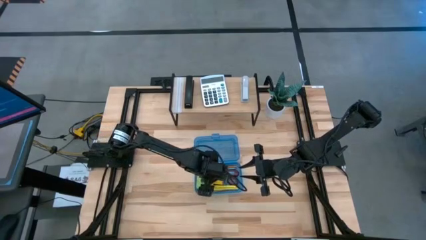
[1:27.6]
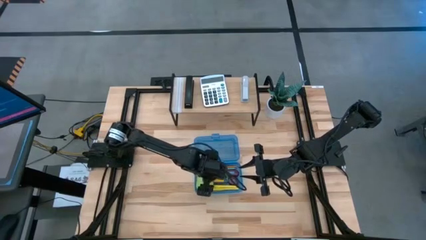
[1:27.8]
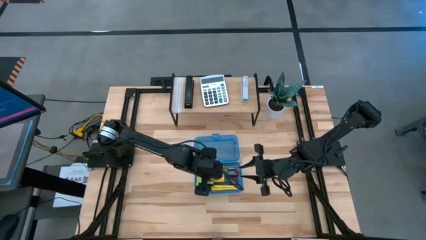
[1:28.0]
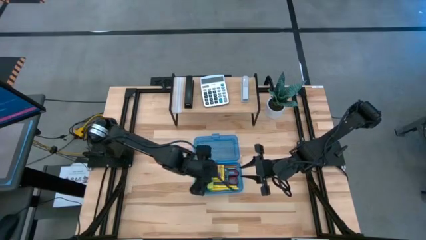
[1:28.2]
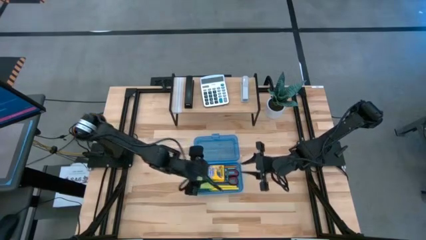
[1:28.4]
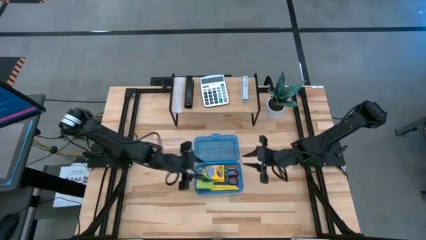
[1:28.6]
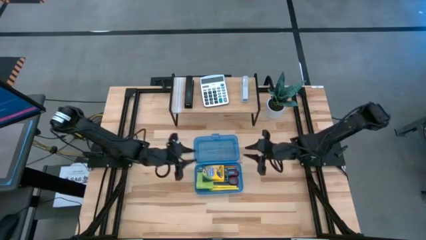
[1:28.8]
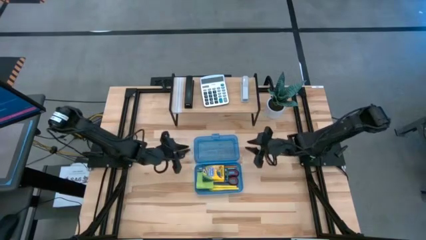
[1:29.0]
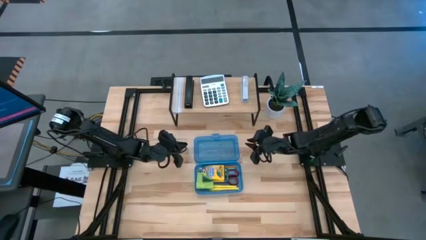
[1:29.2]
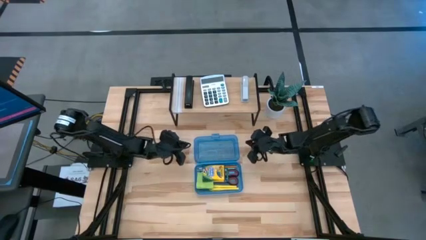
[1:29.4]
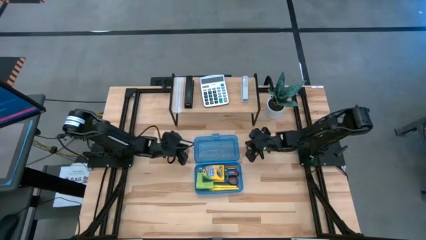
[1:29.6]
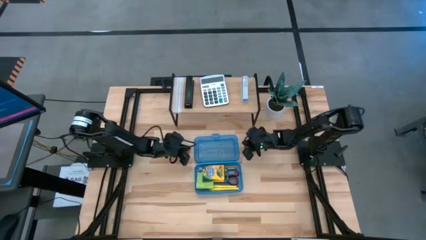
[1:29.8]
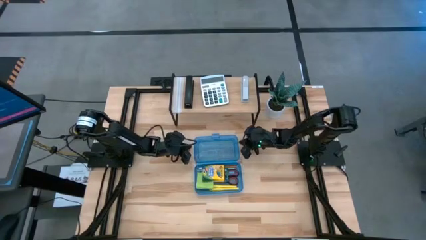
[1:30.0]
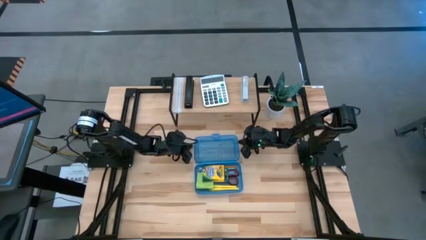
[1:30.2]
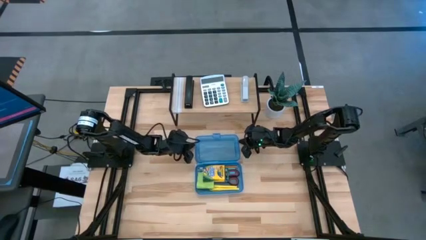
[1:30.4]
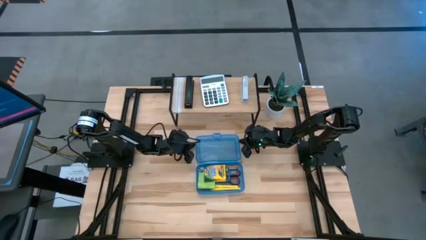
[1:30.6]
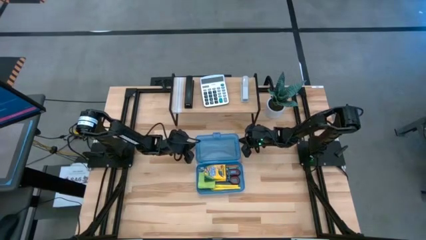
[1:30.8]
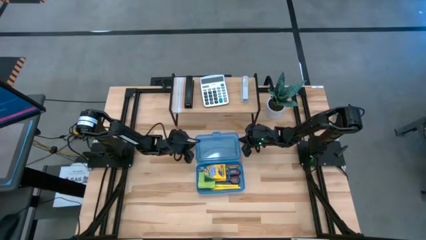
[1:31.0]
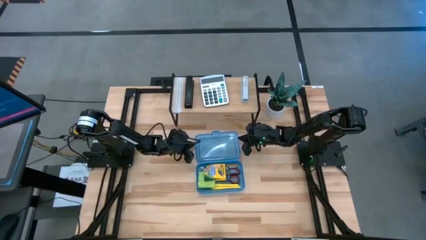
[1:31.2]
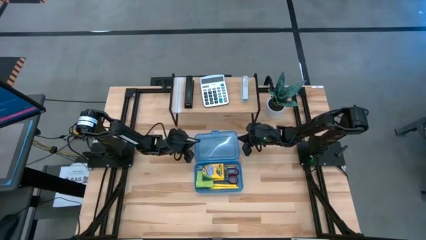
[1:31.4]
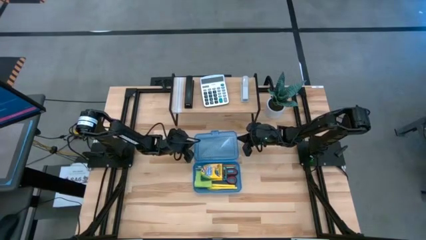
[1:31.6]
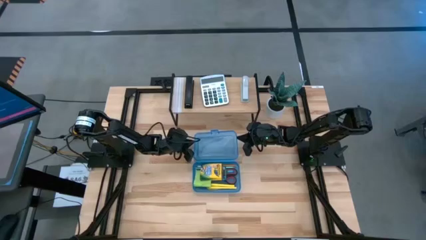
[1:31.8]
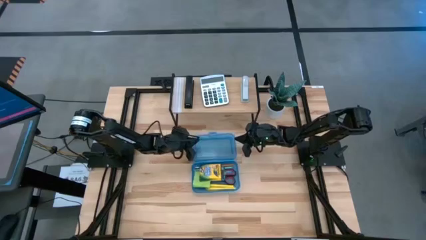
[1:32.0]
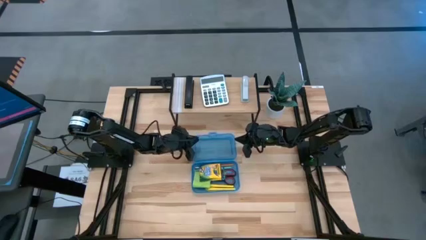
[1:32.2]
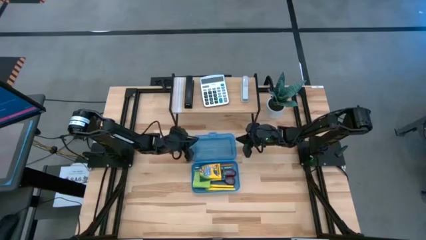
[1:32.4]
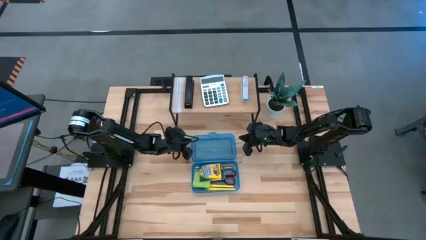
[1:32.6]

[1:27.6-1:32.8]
Task: Pack school essentials
Close the blue supply box

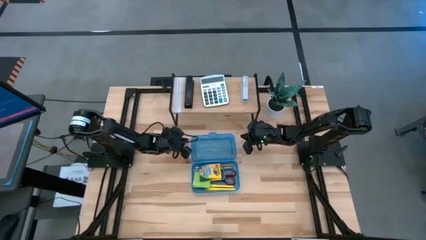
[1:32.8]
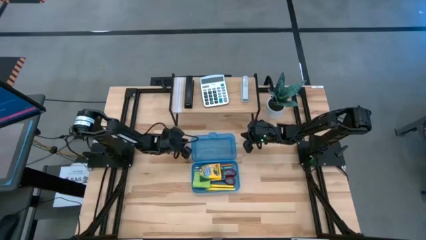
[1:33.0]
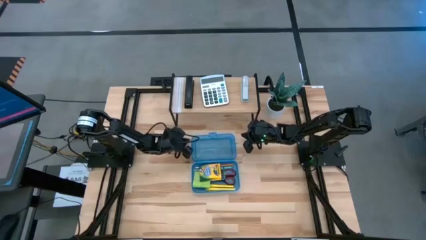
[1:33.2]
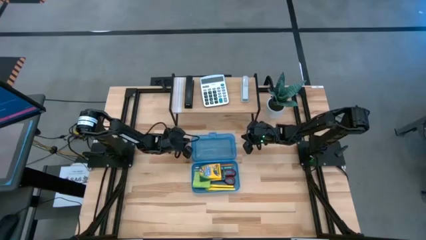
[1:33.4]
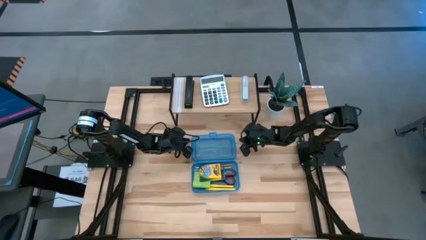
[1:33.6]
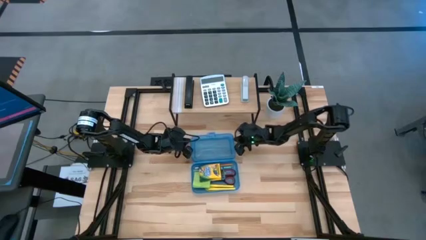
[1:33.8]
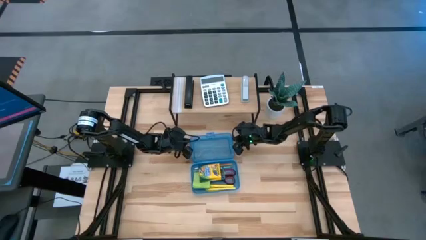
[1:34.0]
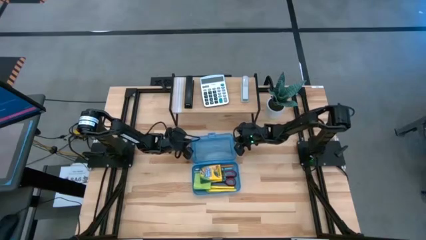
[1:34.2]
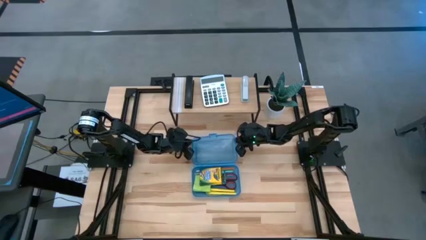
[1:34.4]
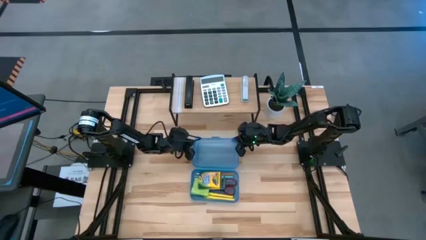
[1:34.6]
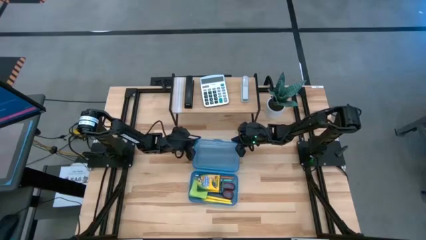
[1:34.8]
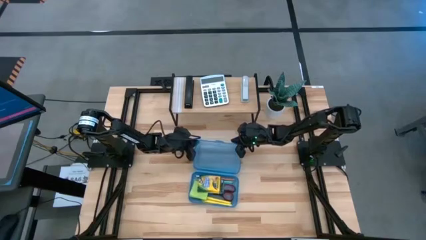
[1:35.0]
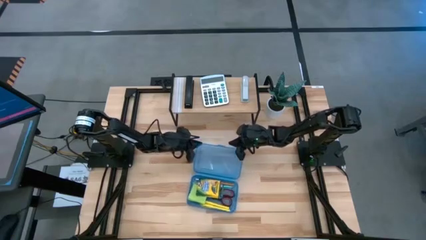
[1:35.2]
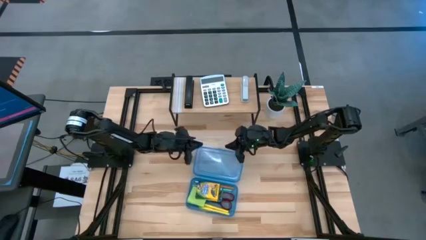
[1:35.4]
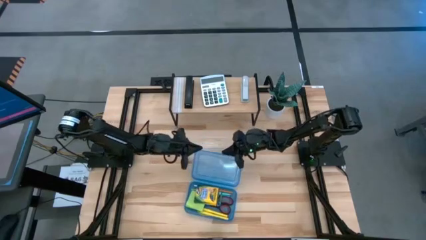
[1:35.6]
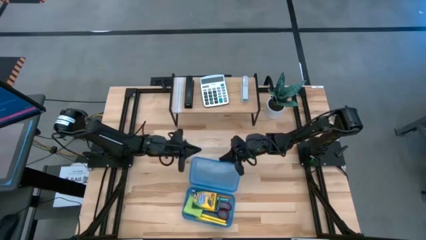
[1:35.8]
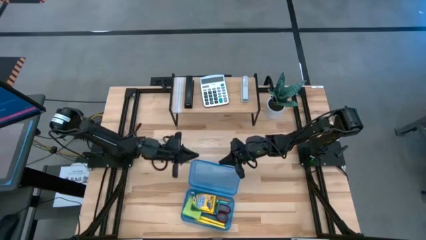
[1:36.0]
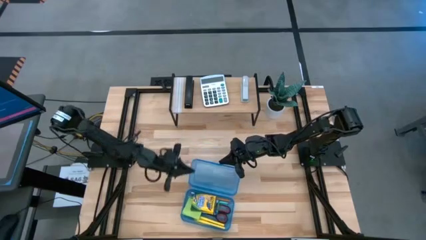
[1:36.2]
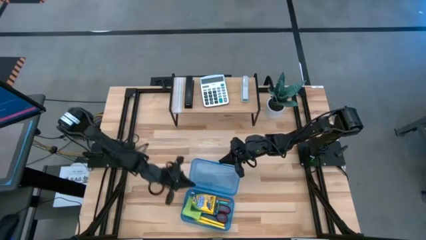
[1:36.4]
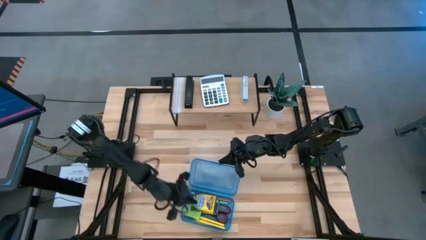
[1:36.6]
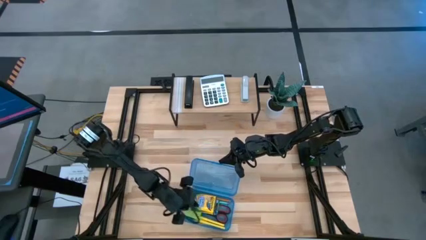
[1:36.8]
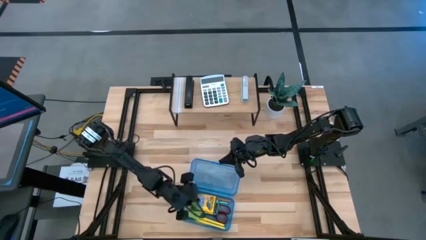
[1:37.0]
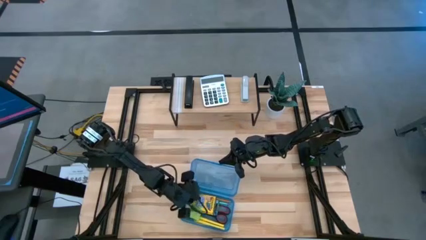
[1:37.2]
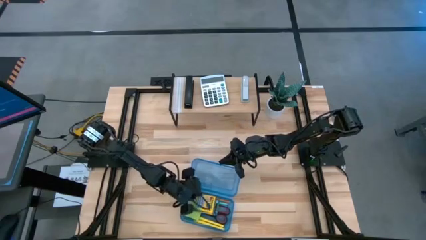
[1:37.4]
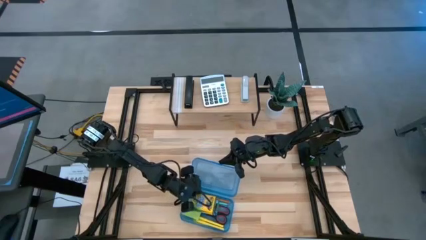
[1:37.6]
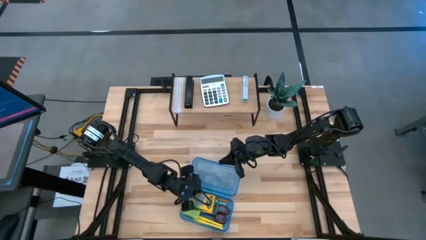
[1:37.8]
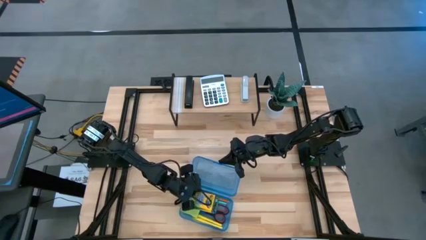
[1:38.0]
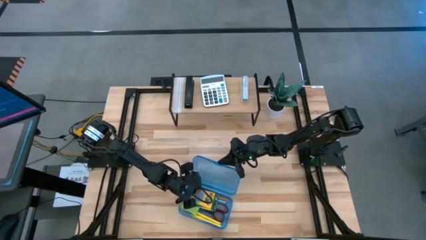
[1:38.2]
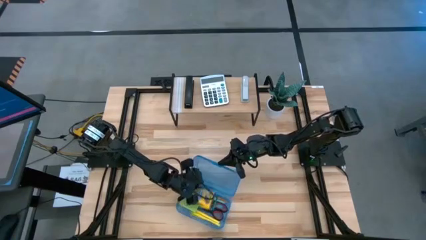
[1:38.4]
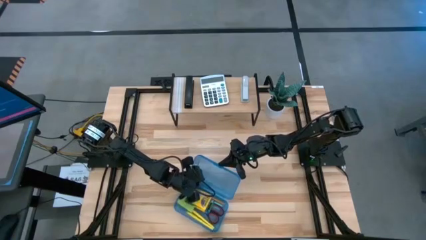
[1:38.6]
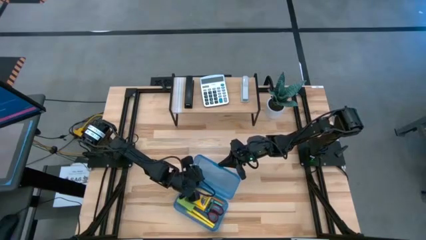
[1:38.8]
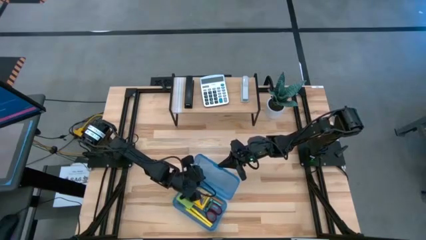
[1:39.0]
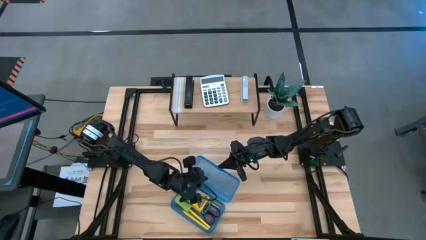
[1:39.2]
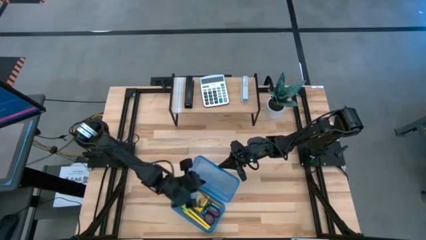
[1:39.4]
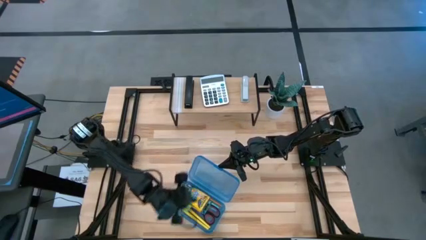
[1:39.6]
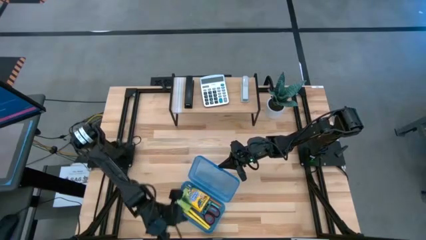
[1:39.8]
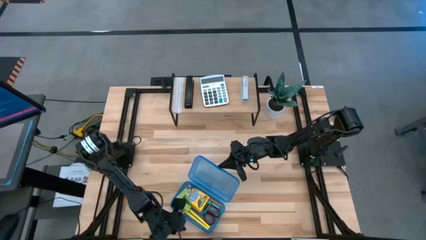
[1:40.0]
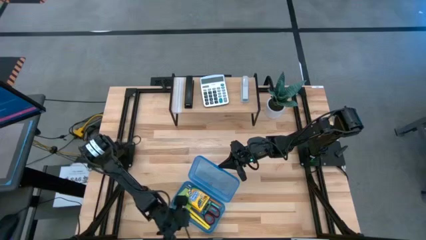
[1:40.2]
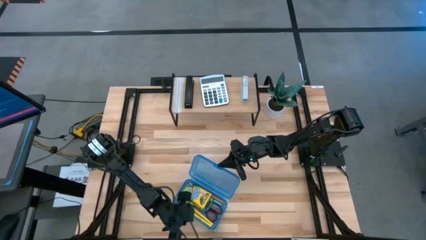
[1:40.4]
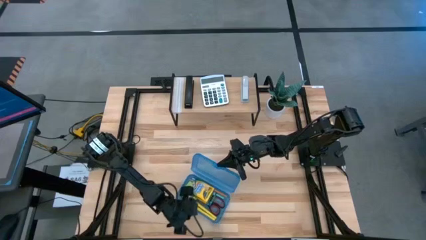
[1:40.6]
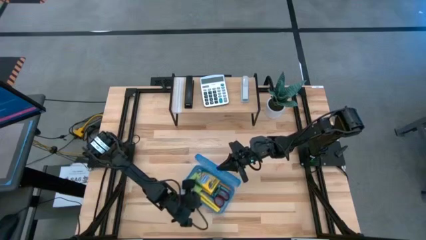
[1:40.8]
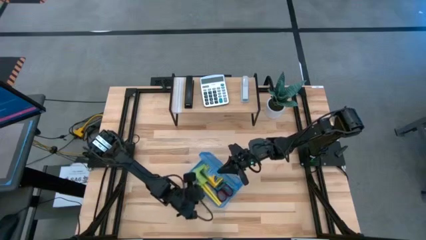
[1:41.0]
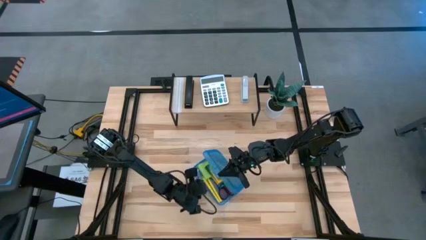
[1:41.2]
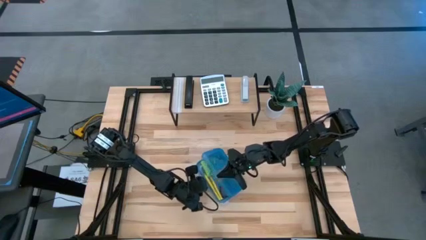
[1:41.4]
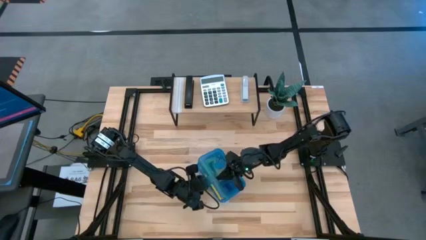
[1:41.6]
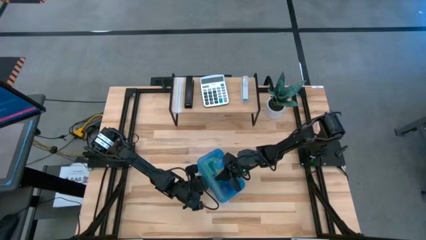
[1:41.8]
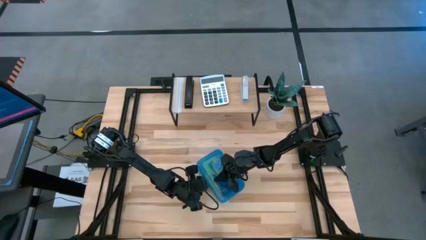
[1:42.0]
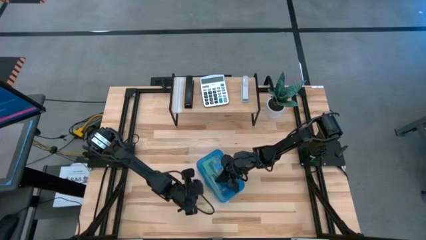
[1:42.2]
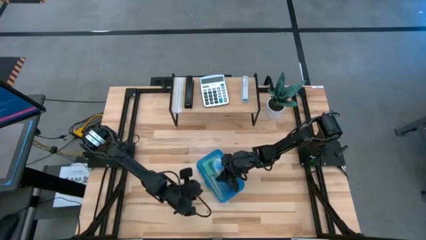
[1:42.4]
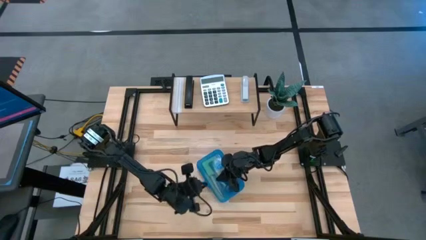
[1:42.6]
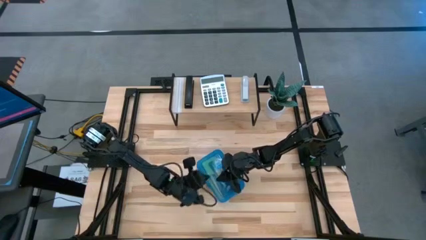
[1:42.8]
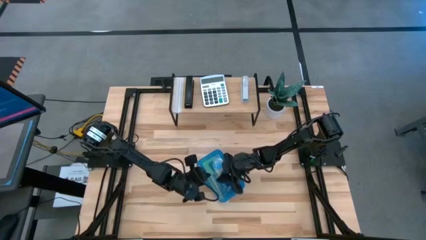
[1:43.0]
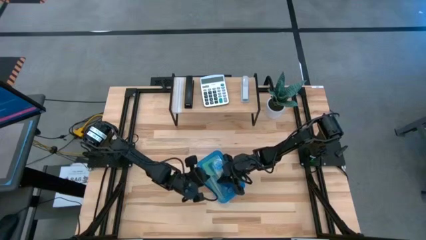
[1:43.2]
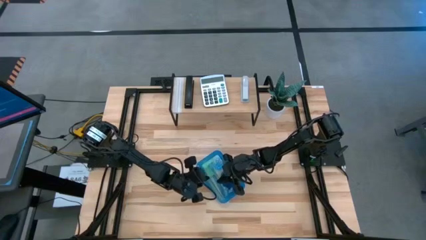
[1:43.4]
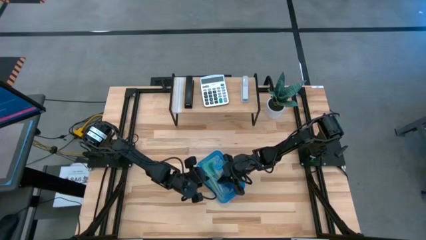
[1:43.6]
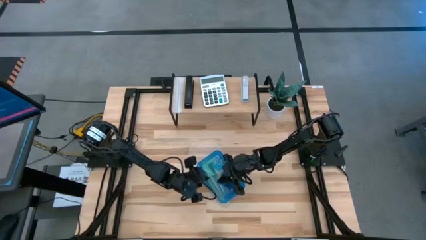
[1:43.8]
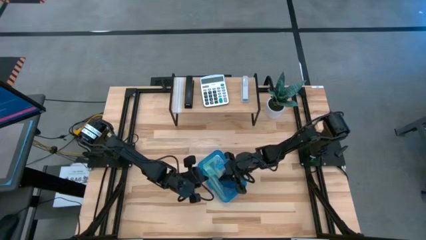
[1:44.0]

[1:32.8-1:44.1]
Close the blue supply box
